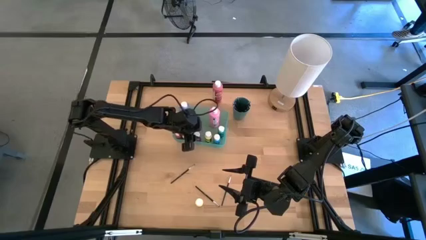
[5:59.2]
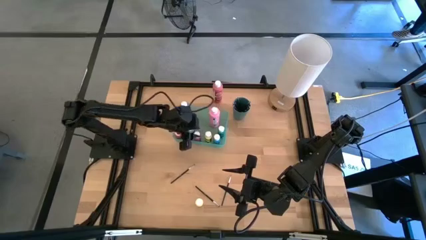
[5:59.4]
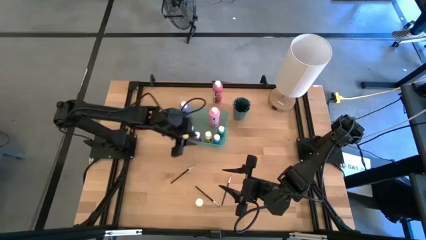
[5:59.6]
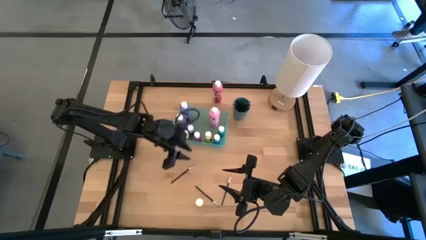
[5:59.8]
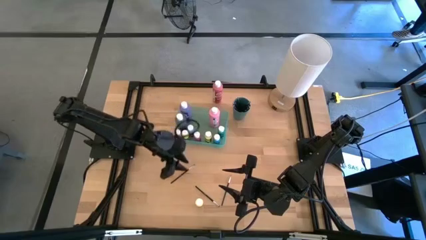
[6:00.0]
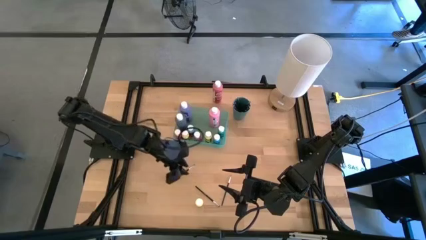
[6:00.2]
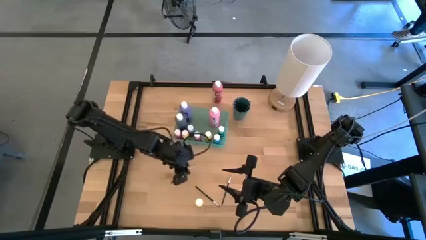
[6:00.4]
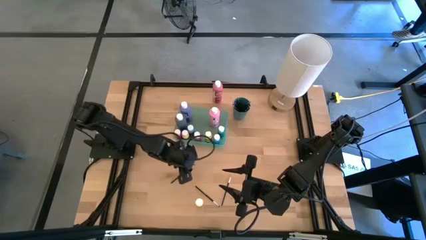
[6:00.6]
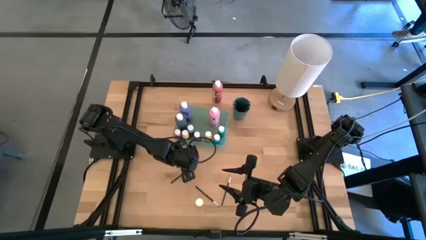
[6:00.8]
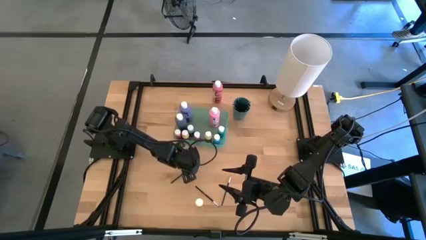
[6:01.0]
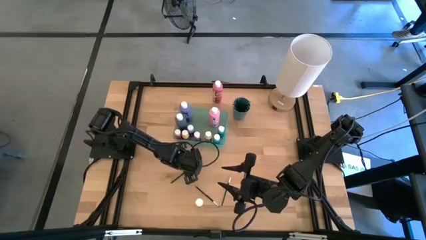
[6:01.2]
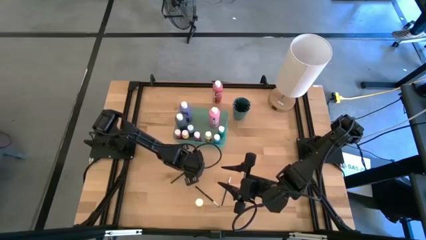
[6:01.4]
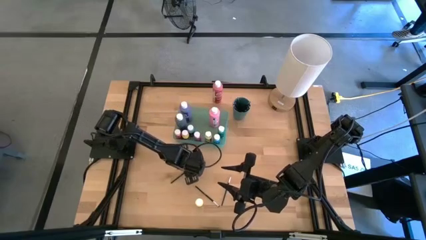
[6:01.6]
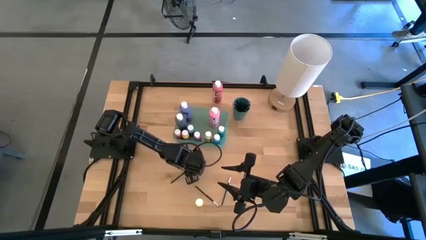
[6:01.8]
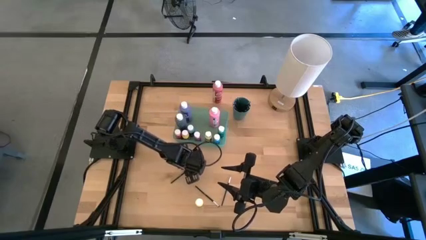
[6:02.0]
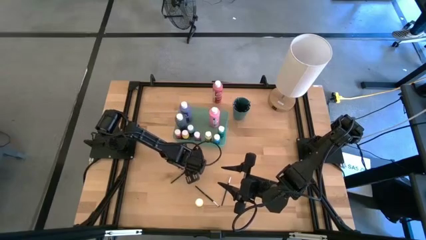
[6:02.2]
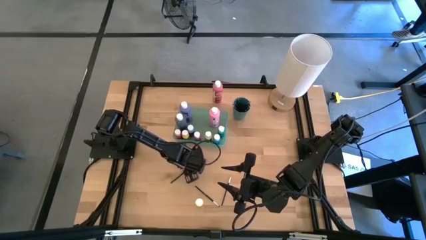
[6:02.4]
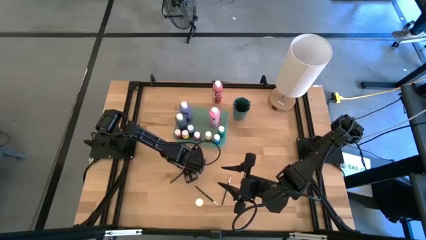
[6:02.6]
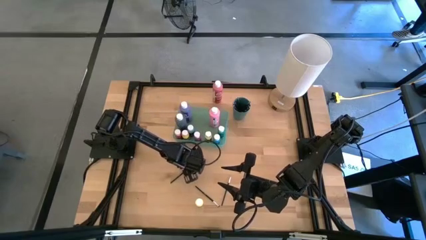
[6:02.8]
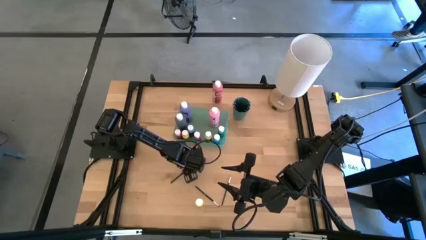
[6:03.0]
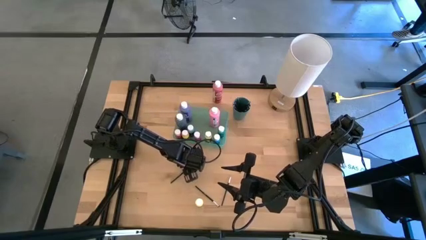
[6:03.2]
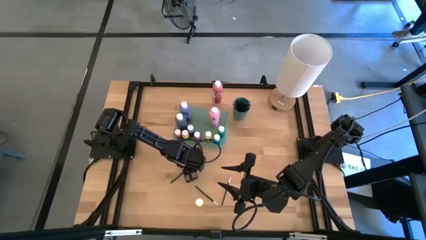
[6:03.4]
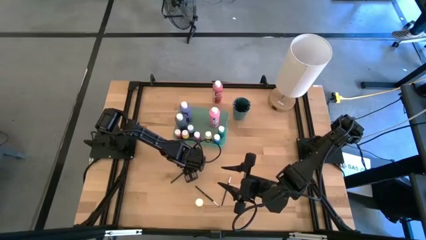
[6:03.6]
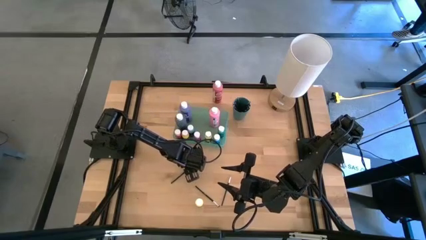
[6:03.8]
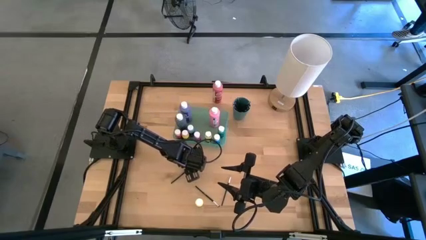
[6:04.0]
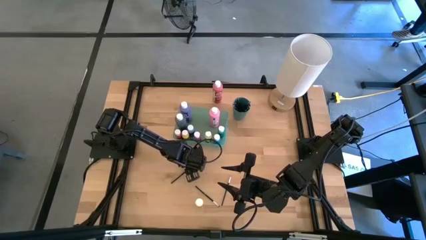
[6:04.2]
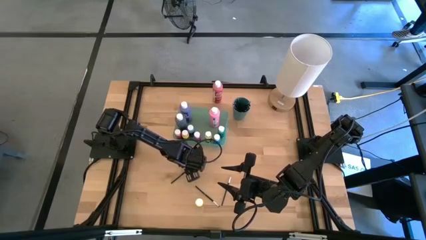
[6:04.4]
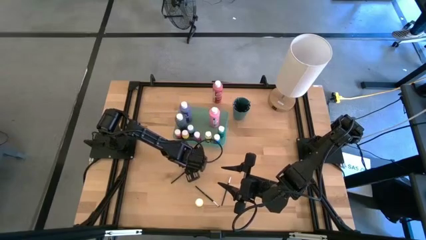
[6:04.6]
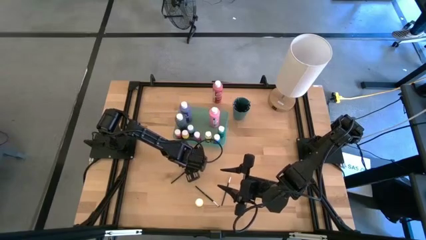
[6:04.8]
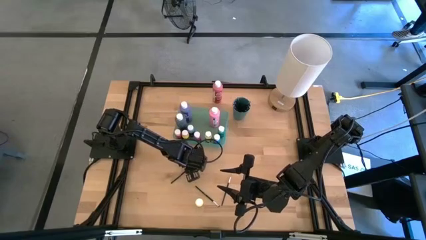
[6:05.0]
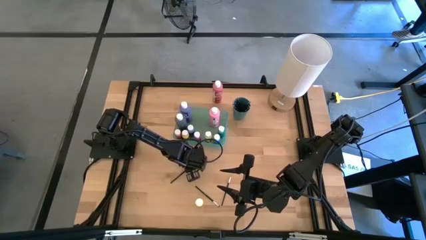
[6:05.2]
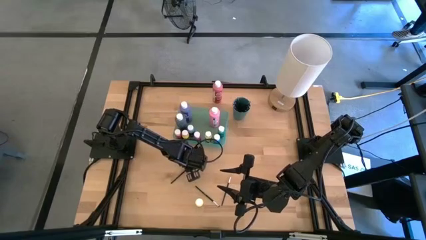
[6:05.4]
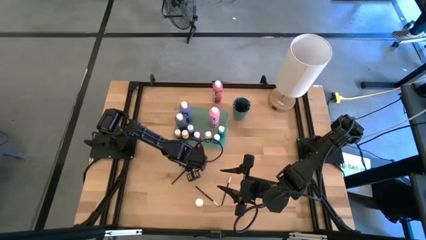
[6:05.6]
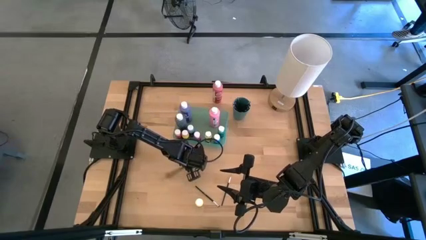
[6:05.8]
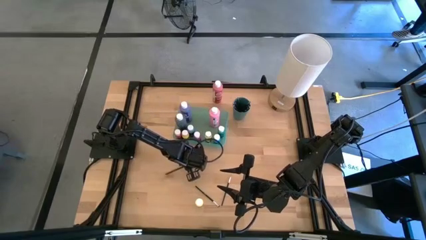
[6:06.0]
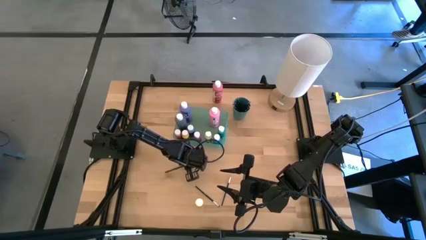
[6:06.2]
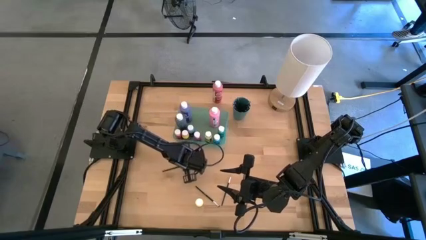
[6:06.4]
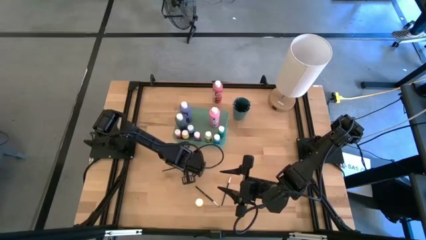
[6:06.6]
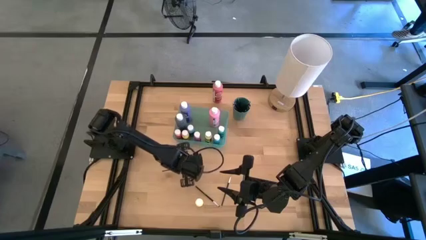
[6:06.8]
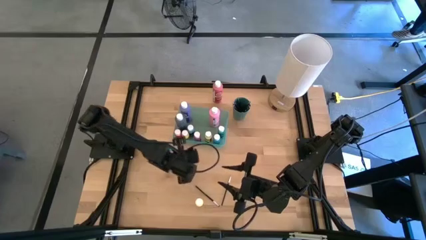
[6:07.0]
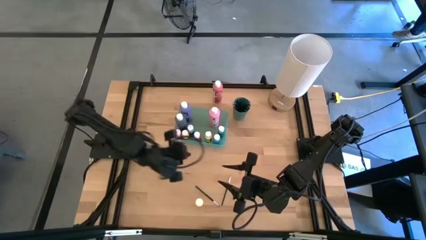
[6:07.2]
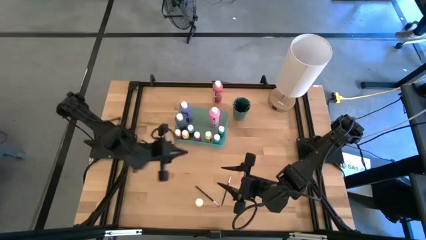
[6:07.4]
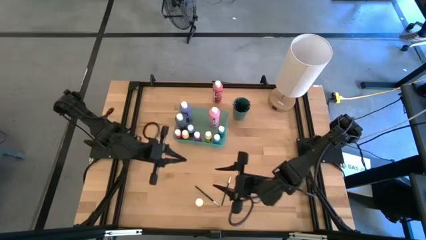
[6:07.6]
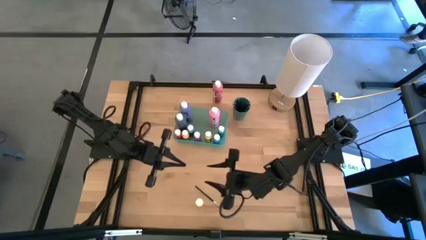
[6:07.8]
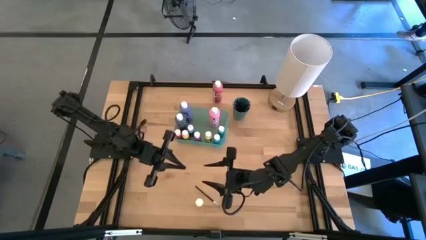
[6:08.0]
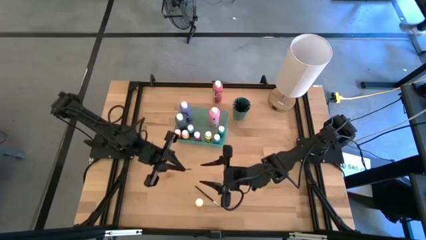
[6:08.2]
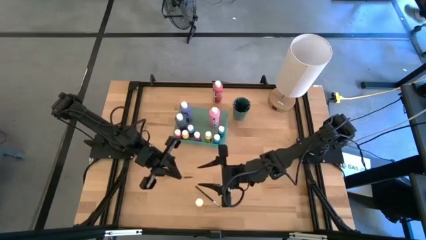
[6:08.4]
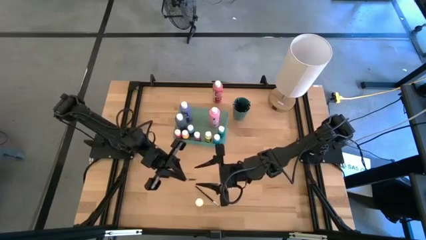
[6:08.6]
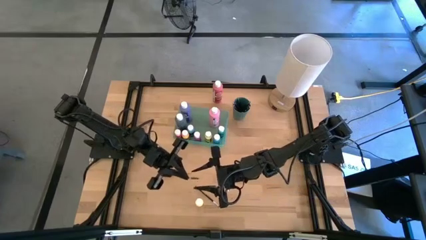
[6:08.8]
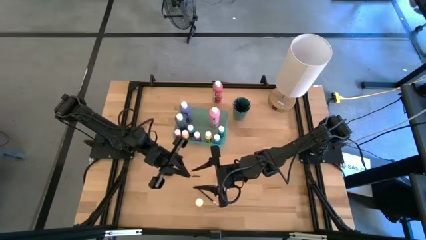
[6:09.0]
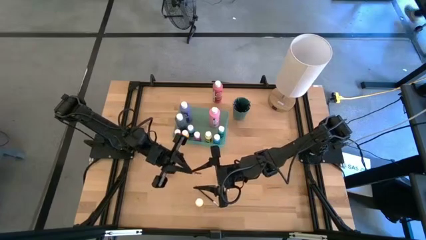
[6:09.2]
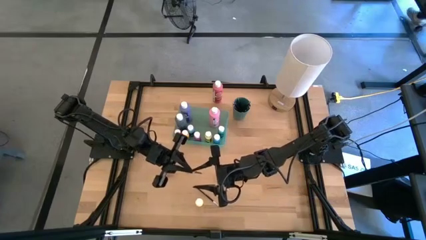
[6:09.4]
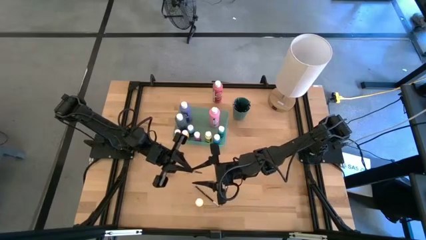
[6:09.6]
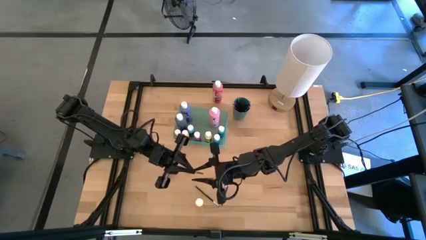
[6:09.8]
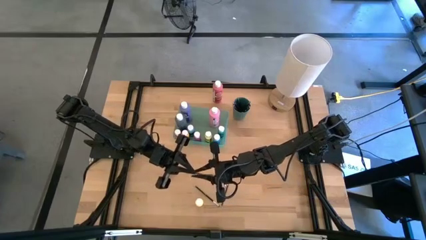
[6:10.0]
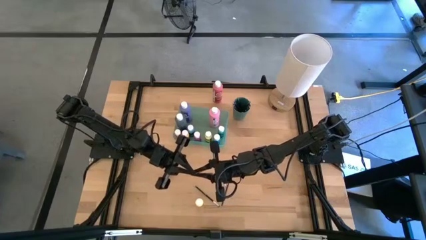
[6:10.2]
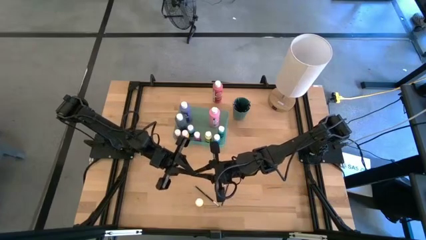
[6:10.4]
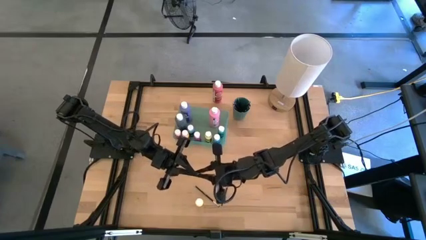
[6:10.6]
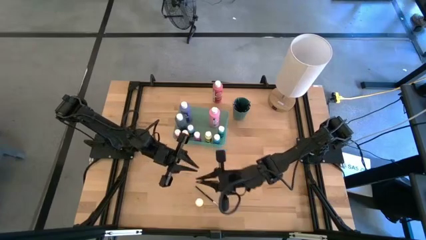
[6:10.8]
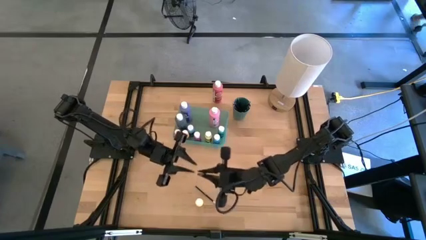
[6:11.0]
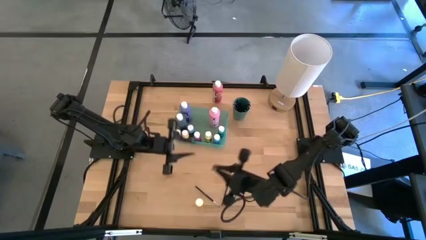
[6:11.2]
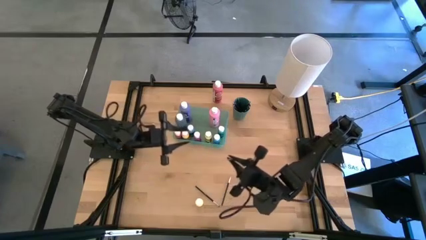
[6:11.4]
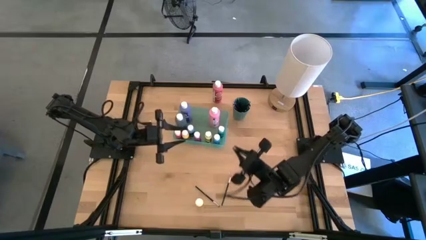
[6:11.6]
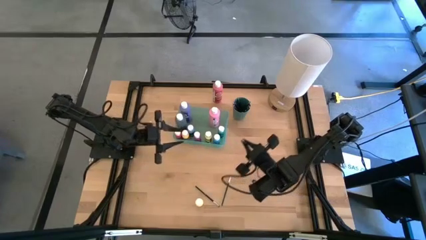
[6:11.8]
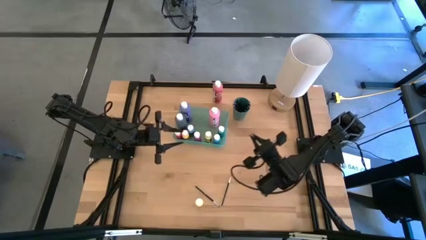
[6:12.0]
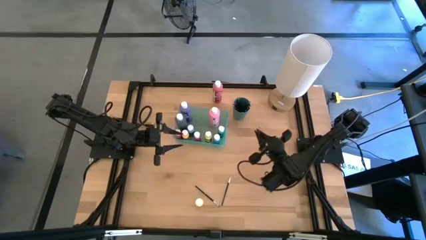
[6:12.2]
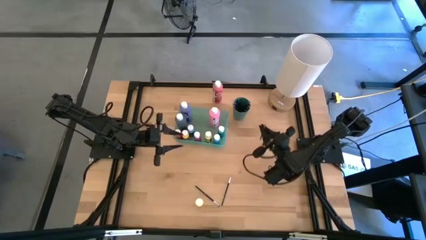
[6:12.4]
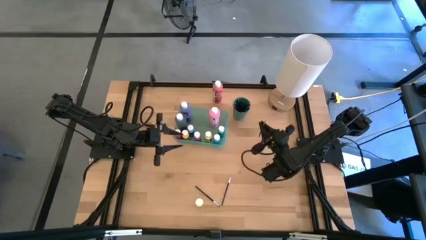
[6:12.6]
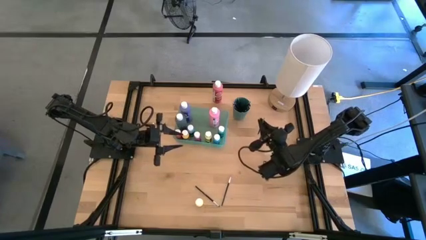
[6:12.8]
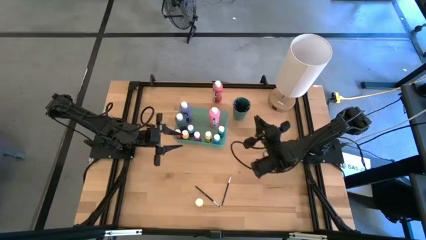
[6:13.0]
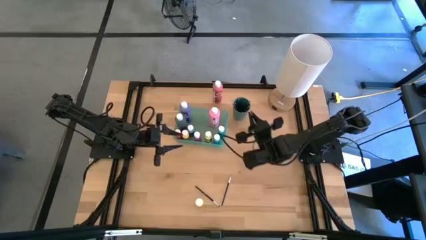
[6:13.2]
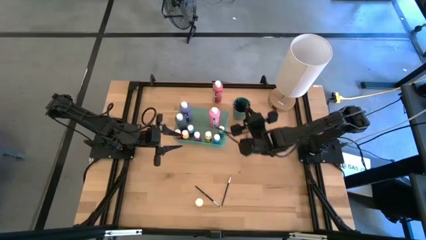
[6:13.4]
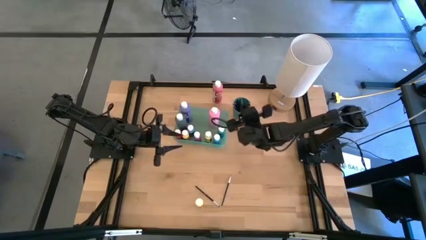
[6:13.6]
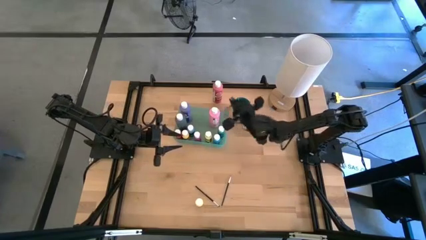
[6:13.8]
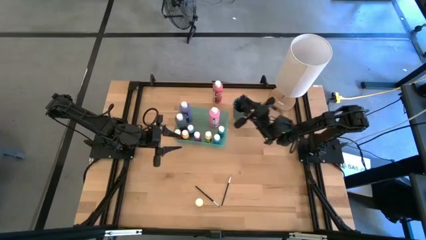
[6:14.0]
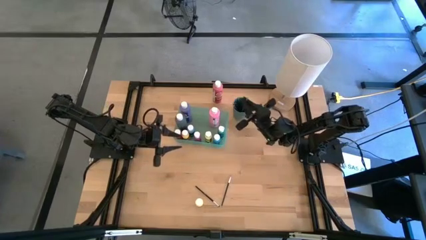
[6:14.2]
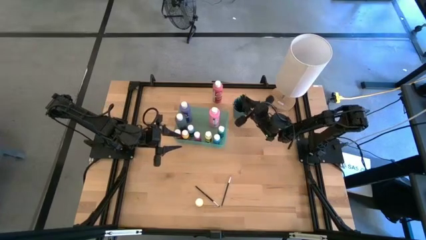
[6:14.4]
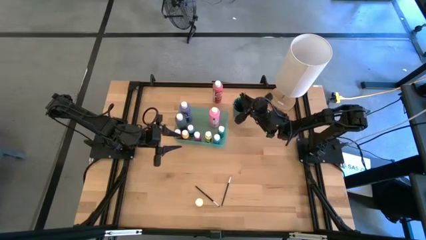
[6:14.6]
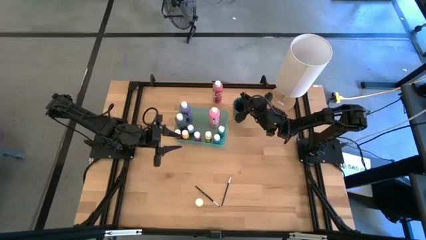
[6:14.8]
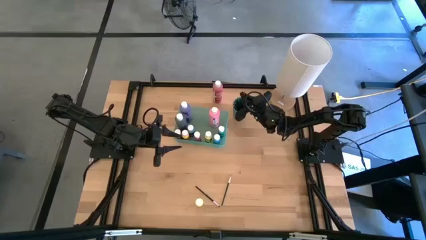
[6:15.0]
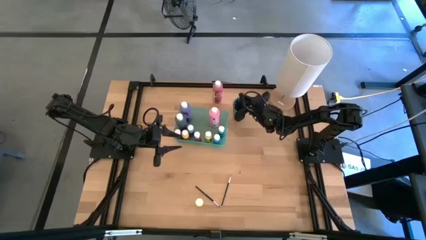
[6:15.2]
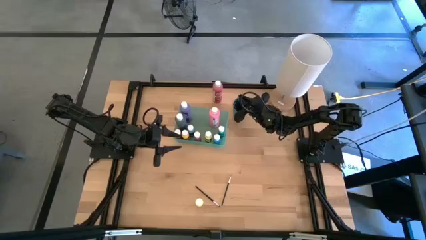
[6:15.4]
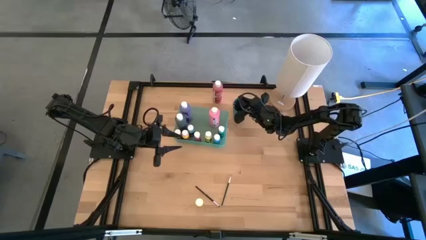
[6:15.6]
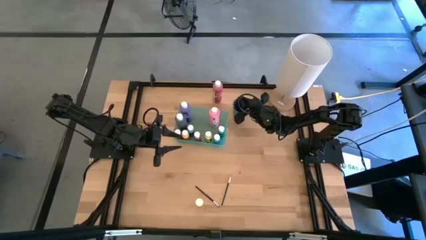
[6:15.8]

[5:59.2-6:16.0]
Task: Pick & Place Paint Supplies
Put the black paint brush into the dark green cup
